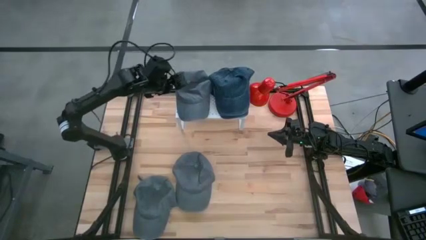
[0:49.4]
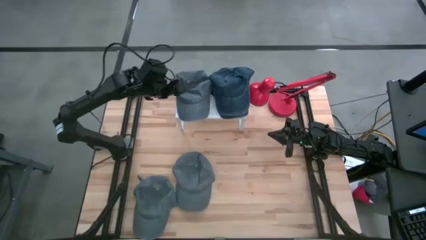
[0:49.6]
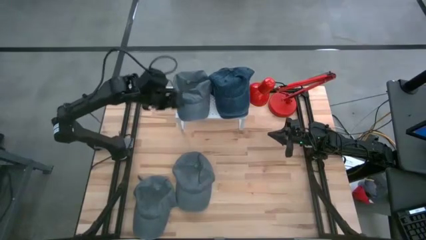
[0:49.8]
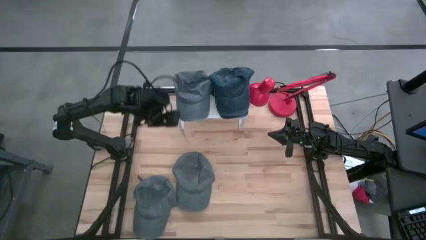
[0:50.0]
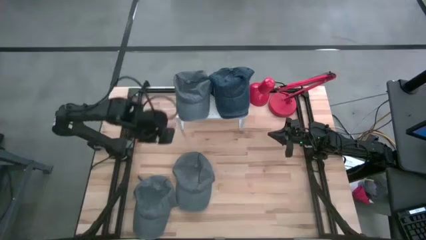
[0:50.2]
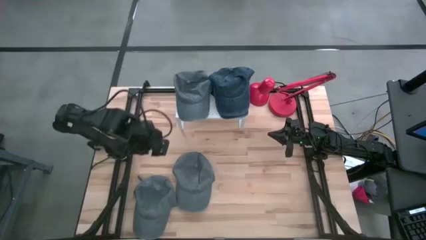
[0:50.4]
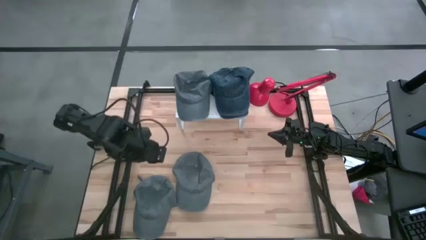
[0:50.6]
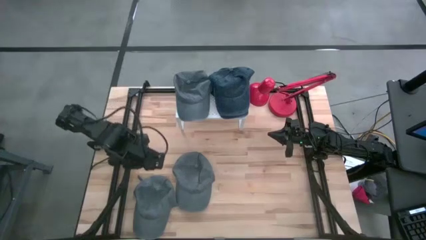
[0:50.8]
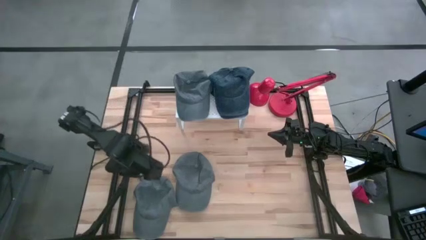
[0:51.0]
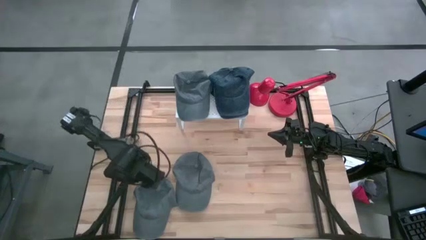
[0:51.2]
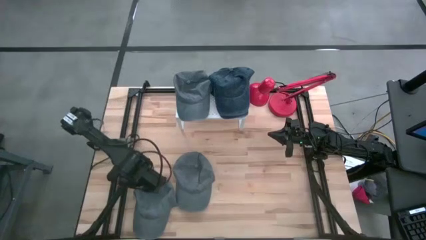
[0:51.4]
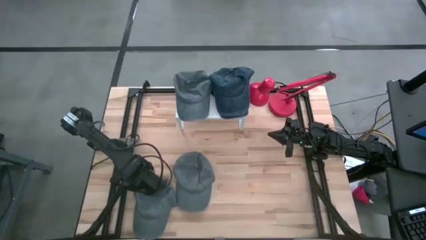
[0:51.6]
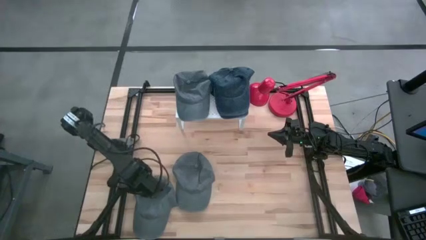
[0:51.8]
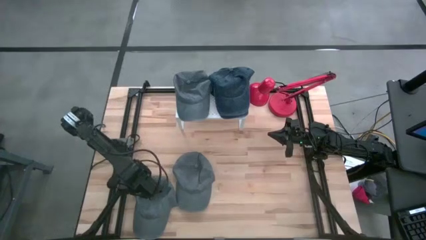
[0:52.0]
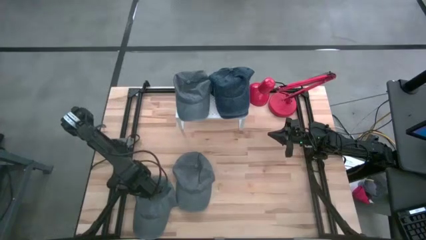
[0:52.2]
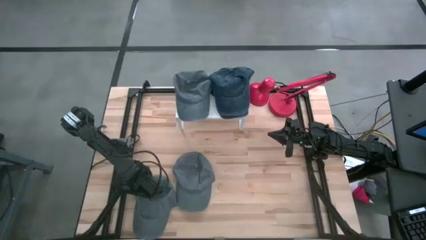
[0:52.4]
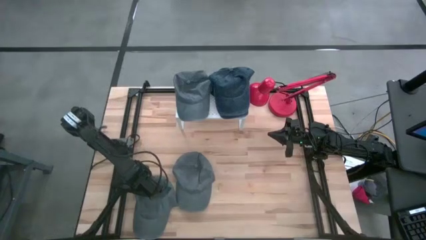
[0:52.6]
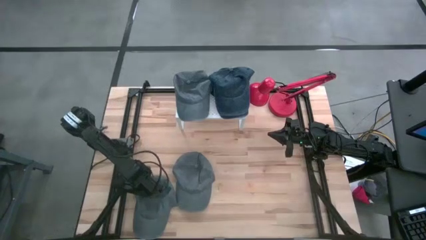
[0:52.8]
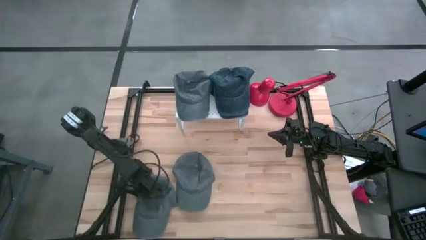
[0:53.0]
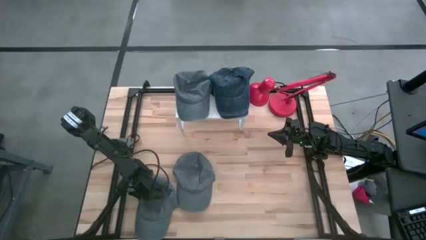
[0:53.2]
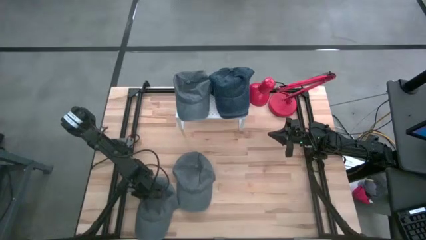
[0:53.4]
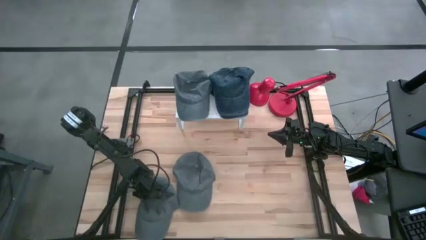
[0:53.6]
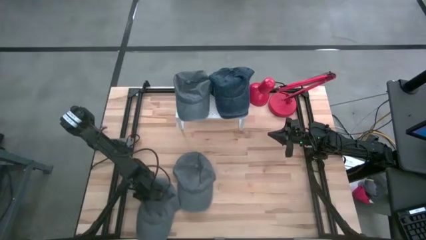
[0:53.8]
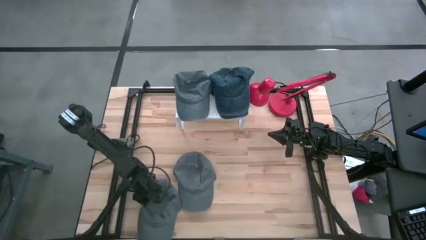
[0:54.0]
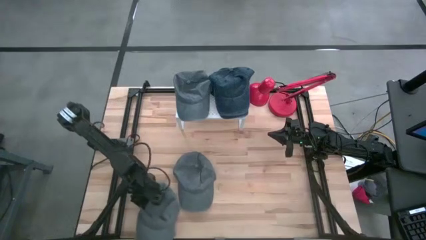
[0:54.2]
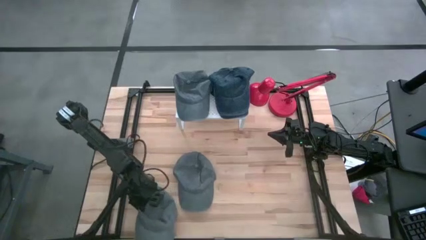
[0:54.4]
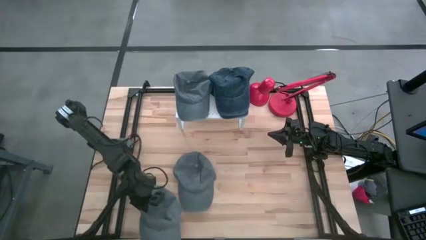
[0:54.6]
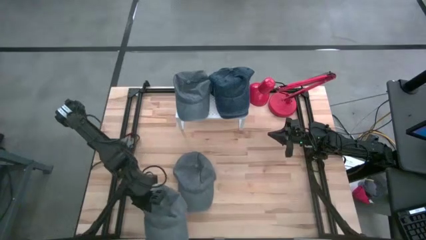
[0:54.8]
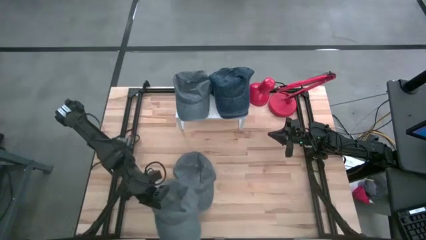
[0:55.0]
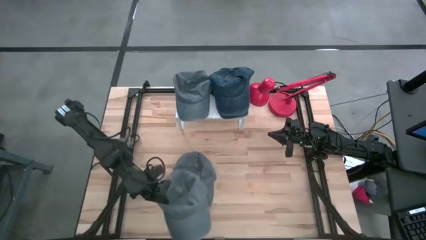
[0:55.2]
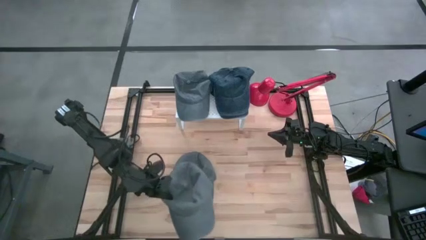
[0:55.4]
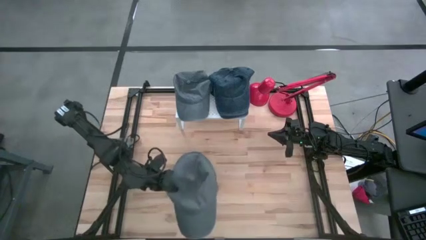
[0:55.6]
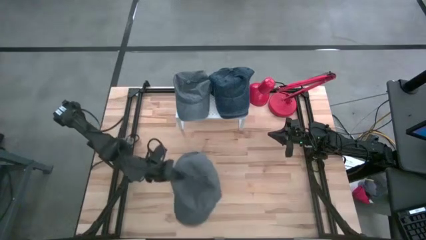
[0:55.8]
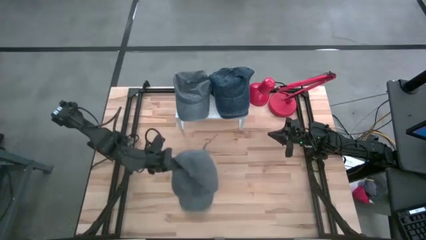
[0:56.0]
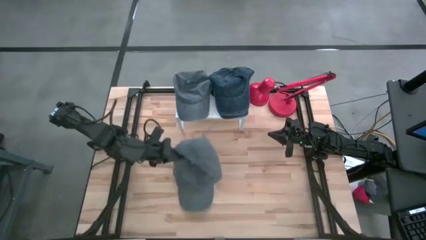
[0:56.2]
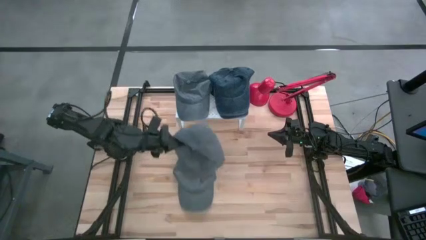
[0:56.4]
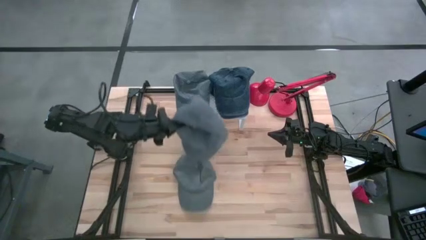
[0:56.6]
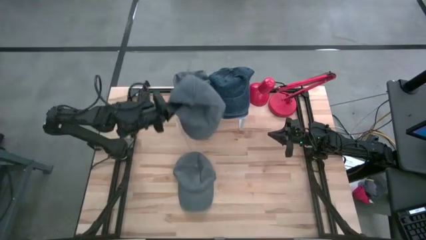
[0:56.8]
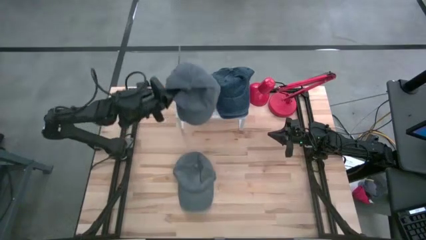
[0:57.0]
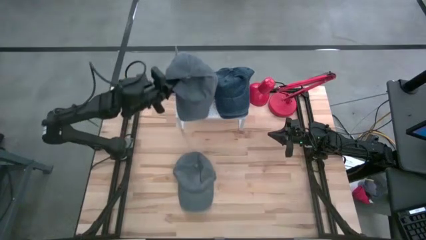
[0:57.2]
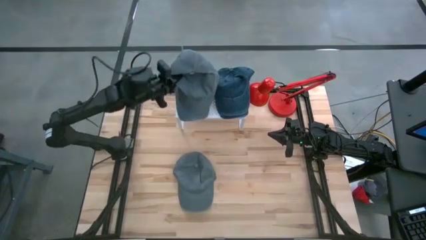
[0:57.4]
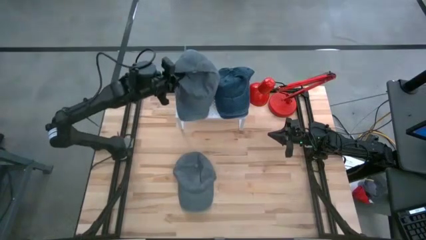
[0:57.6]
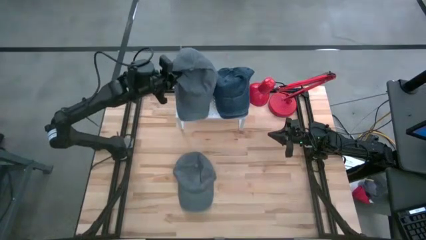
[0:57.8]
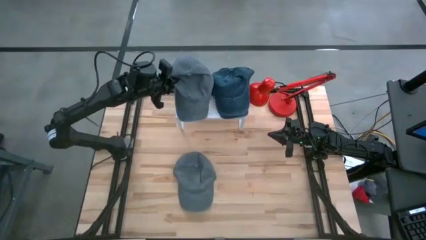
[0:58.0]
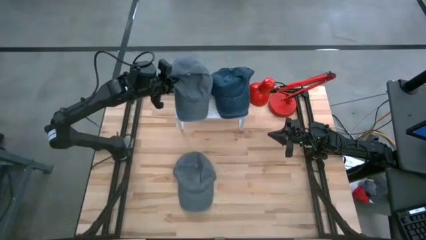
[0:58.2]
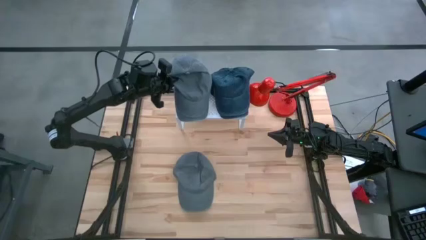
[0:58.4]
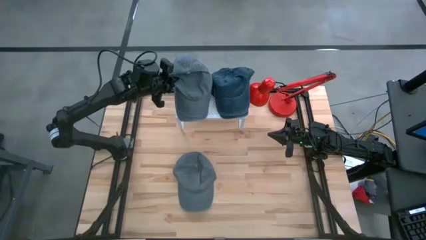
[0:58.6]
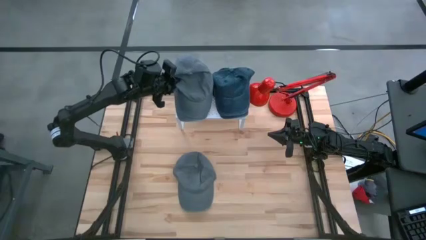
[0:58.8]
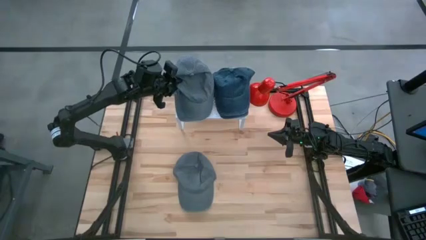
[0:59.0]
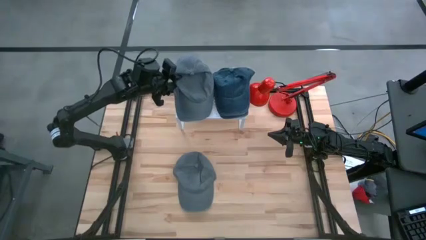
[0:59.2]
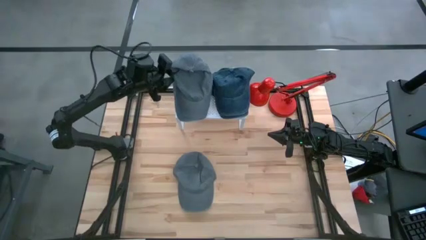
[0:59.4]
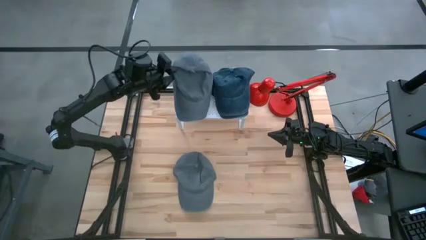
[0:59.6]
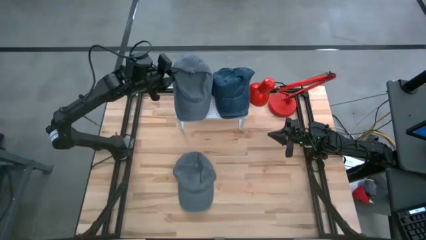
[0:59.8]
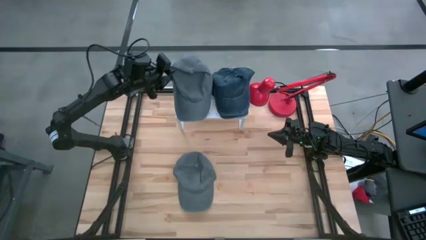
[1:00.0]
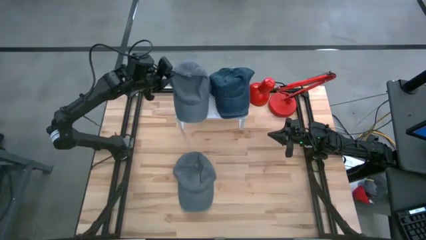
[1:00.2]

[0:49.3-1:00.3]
Task: Pick & Place hat
Stack the bottom gray cap on top of the gray cap on the shelf

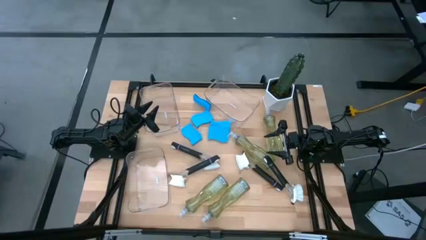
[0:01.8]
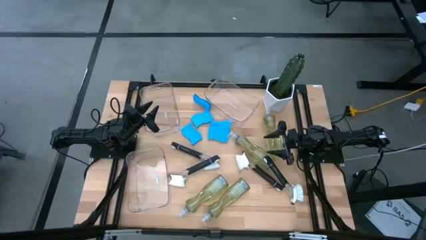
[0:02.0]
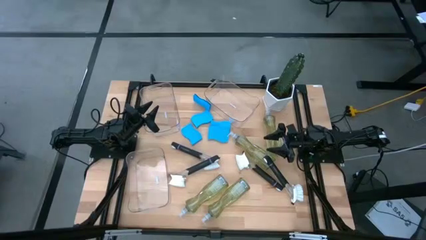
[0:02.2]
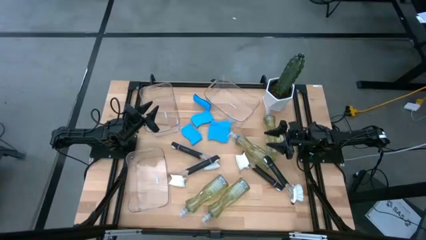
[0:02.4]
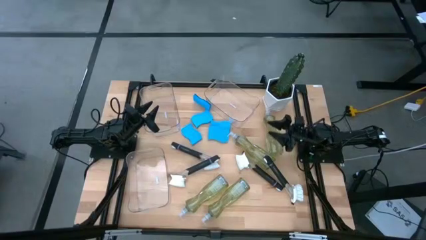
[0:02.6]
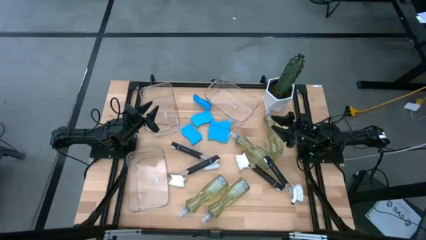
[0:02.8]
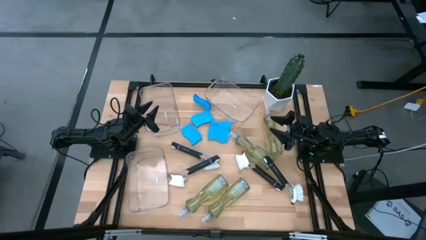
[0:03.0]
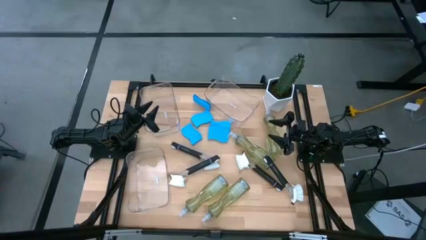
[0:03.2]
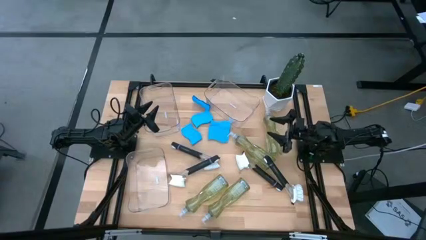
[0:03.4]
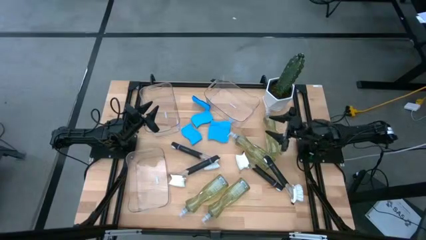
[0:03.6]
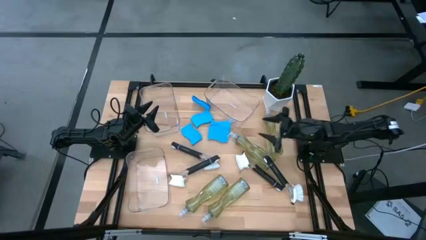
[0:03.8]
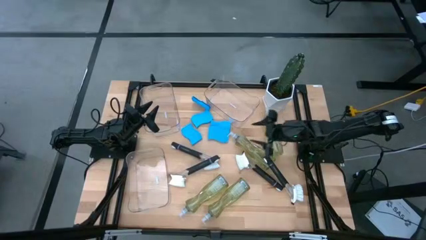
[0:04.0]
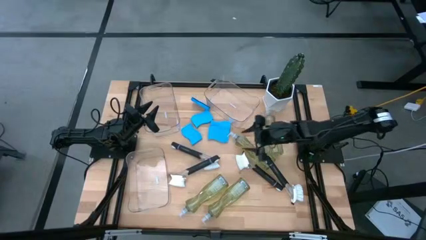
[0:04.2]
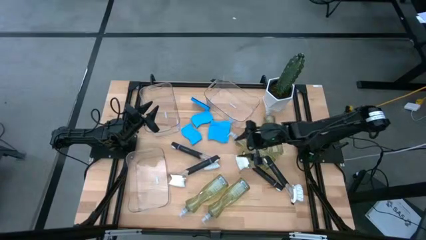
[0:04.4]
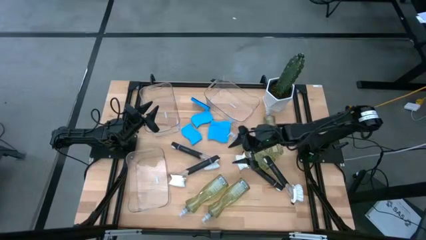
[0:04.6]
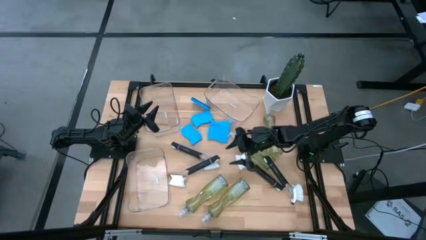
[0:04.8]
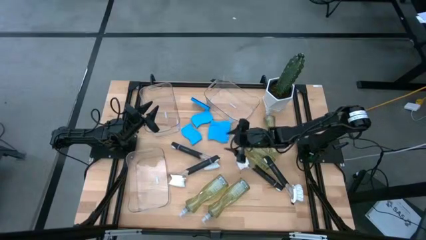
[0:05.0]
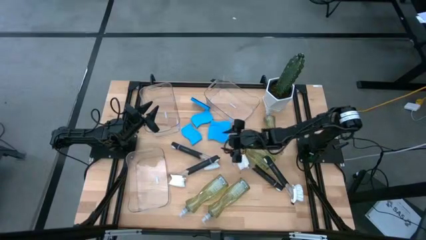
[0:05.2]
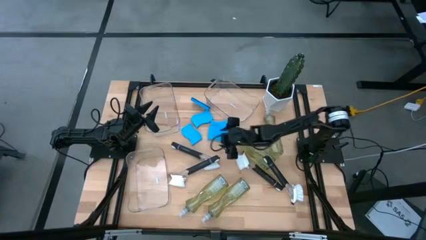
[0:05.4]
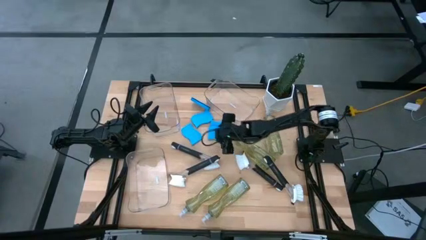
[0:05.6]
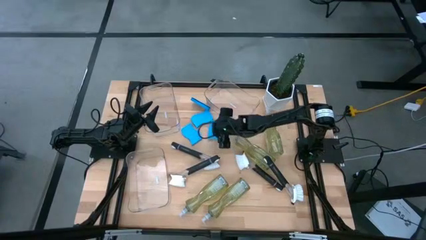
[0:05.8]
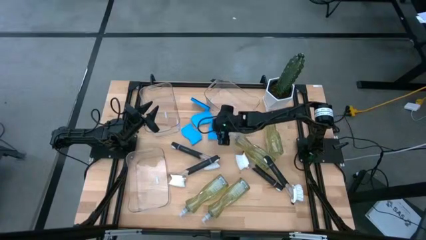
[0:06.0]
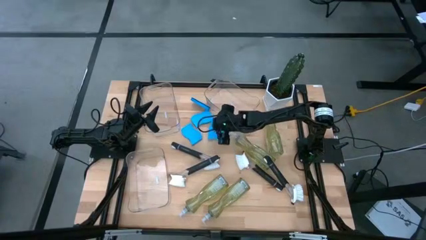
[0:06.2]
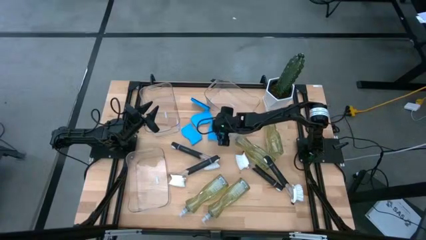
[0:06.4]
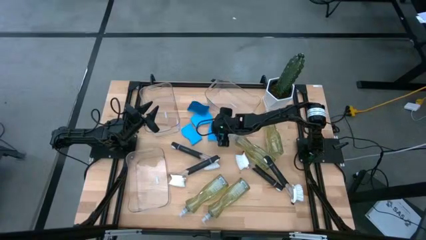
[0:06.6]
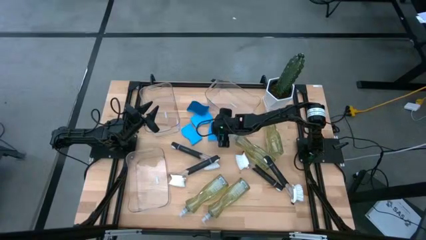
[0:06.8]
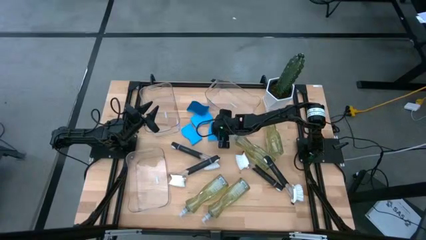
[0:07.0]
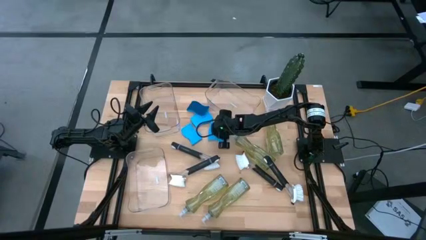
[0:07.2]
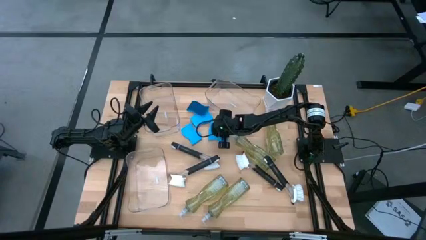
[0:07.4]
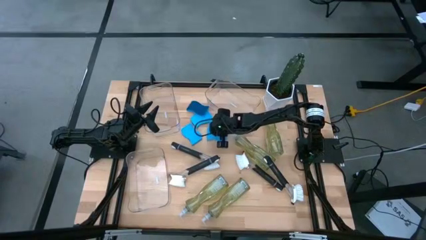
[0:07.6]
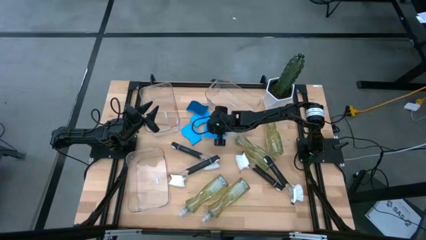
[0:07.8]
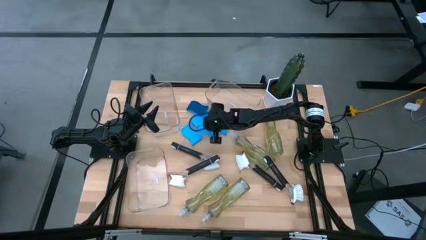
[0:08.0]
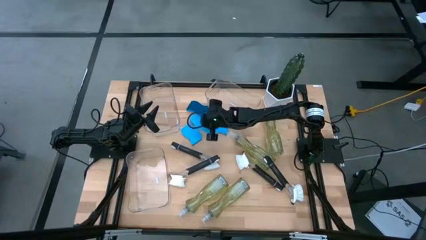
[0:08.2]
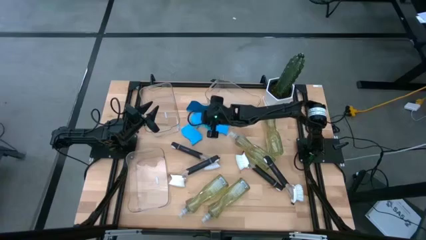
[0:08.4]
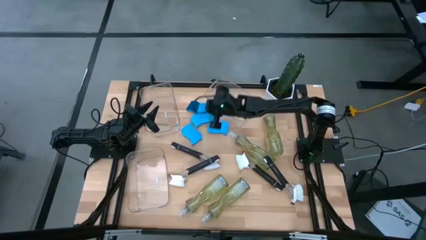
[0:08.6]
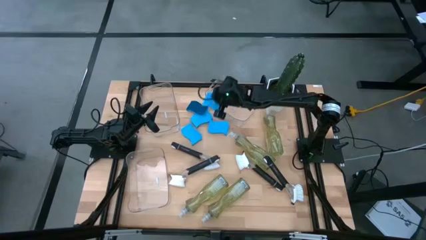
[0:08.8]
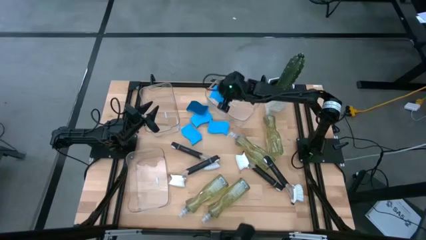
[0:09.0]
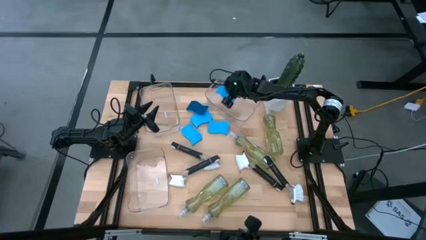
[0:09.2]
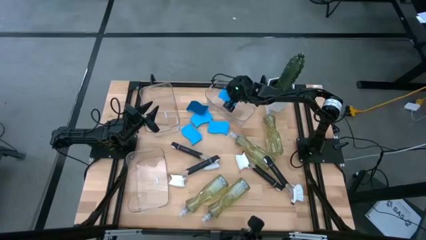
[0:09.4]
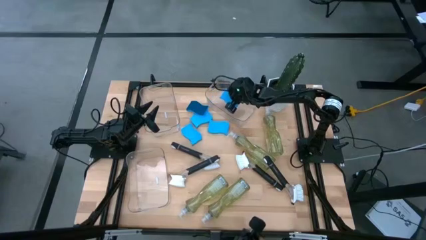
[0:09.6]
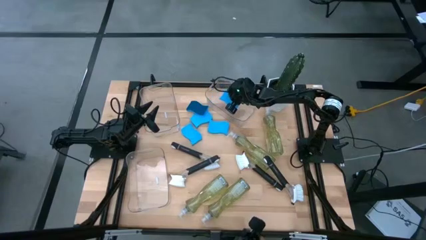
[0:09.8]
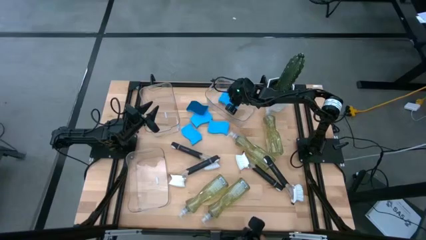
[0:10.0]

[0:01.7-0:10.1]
Task: Pick & Place Kitchen Sink Supplies
Put the blue sponge into the top right transparent bin
